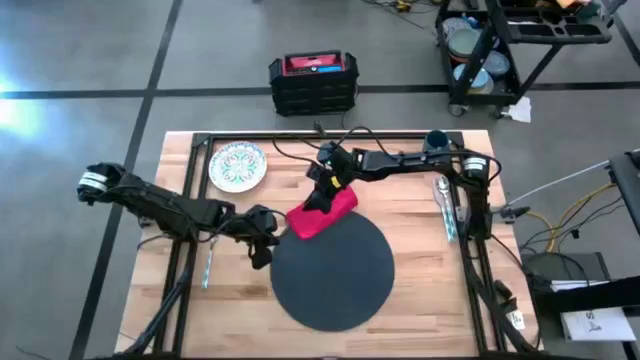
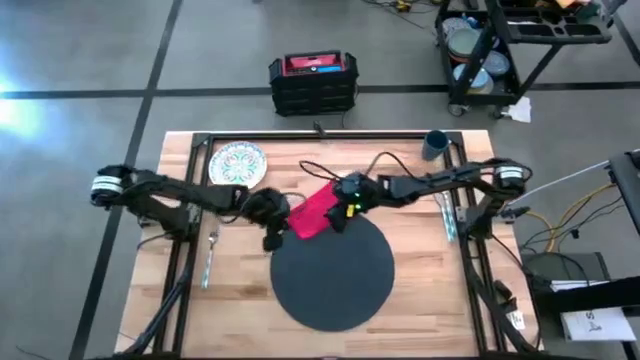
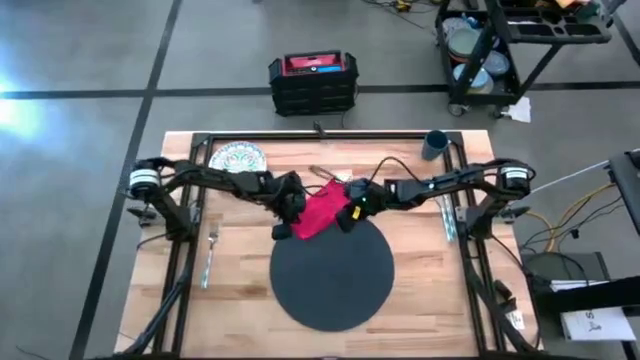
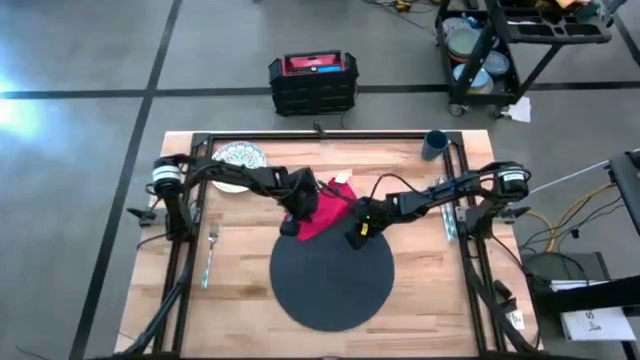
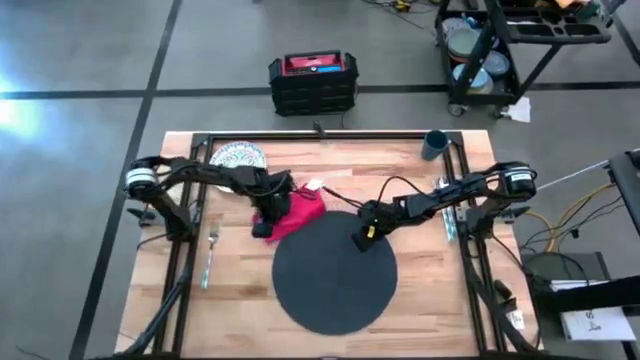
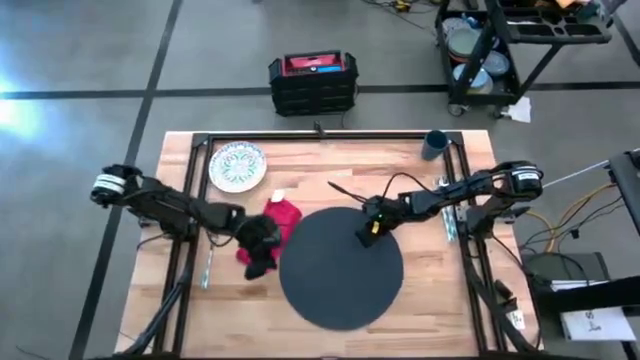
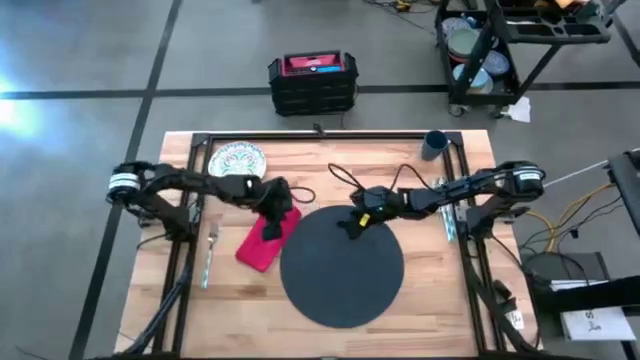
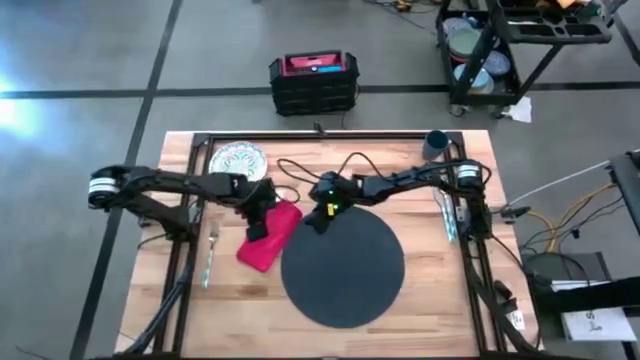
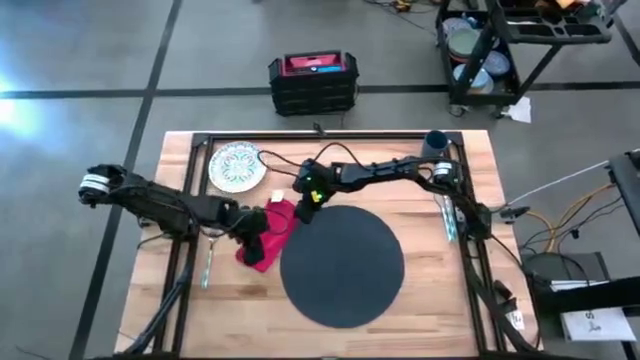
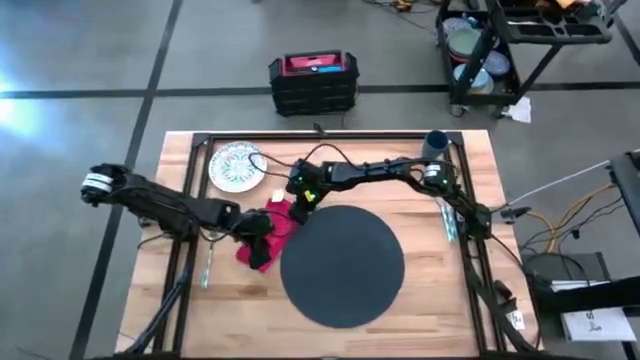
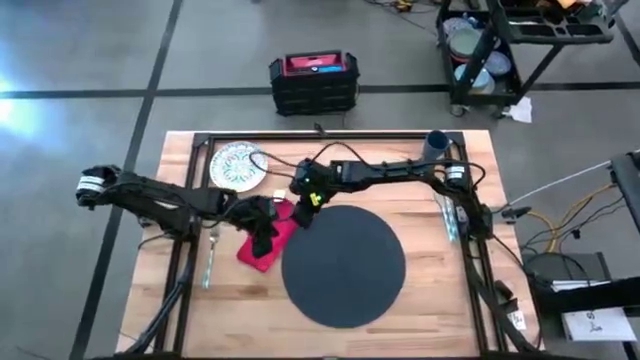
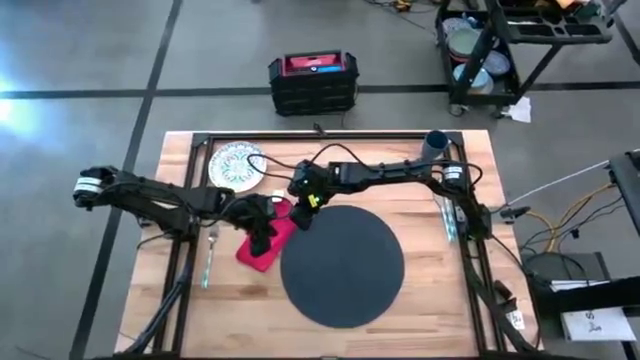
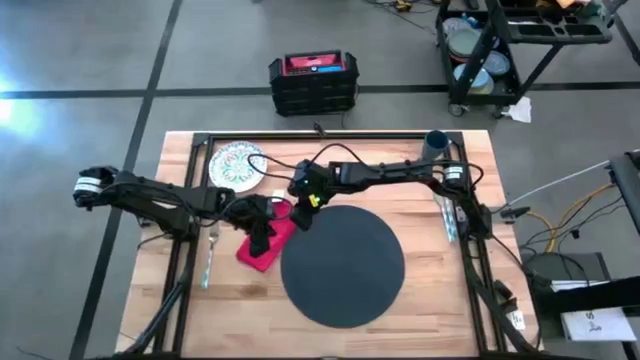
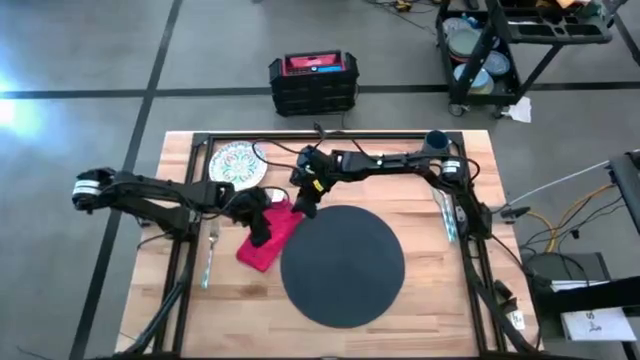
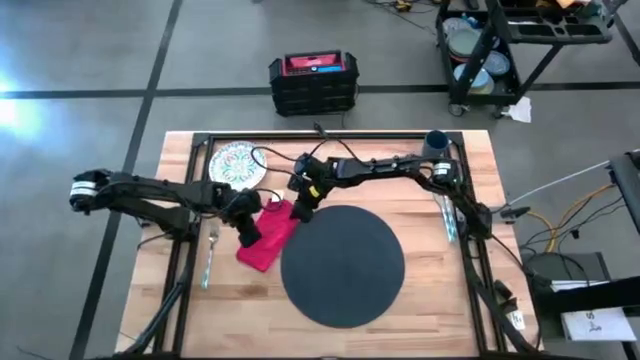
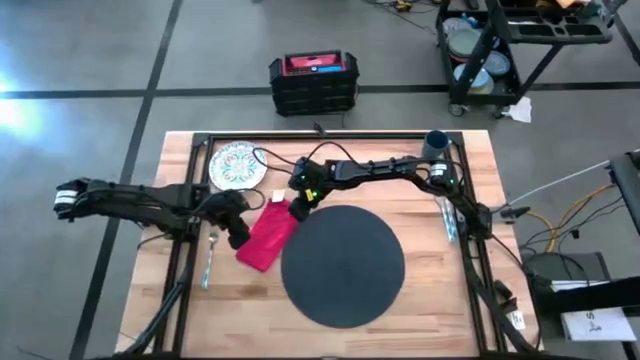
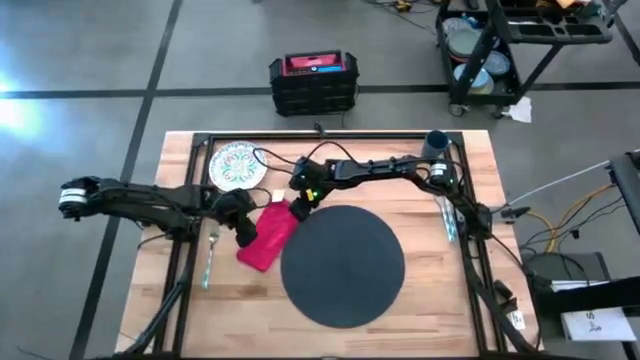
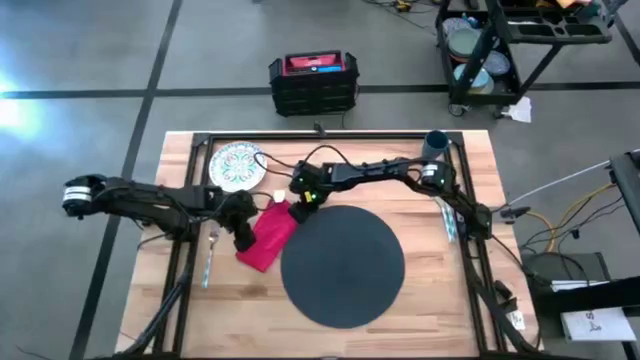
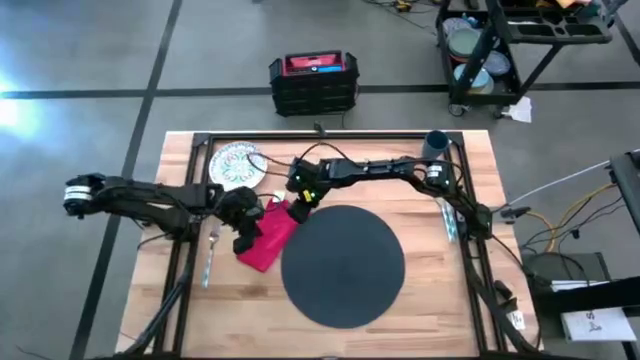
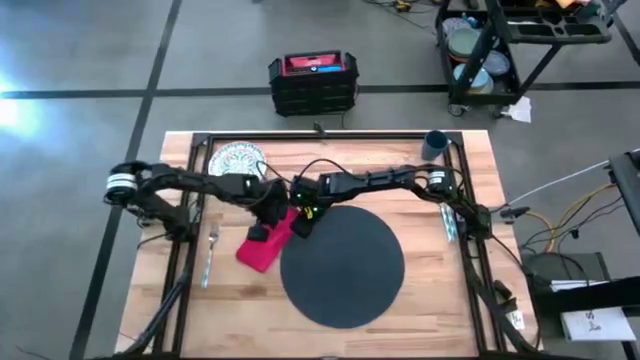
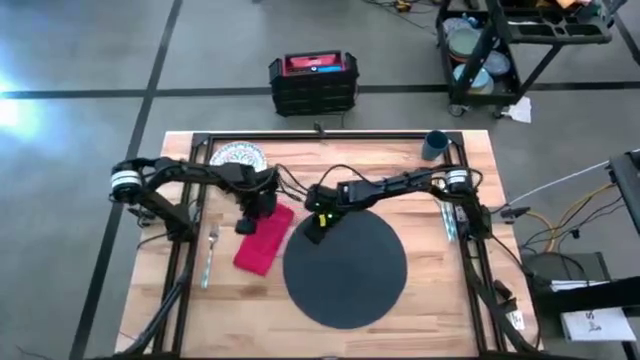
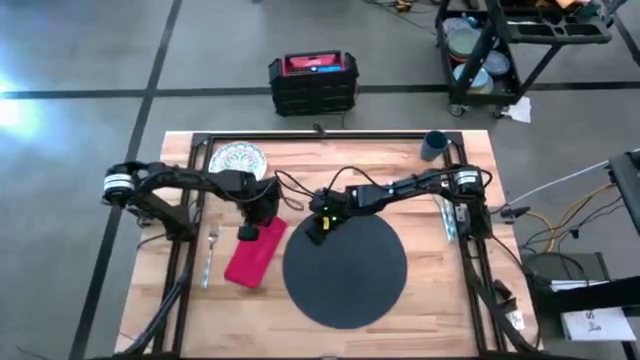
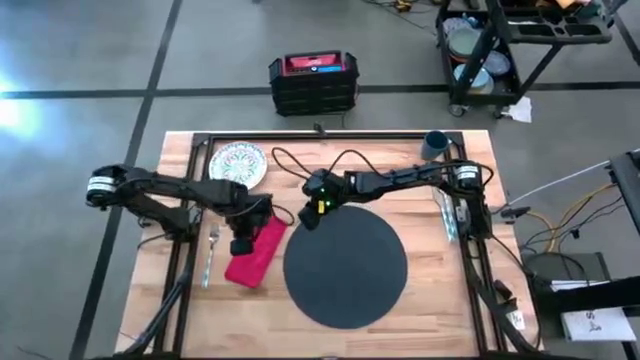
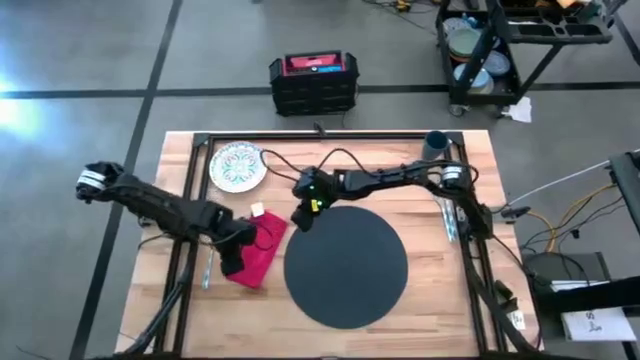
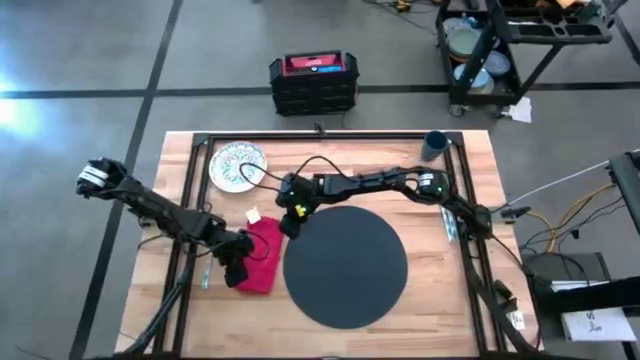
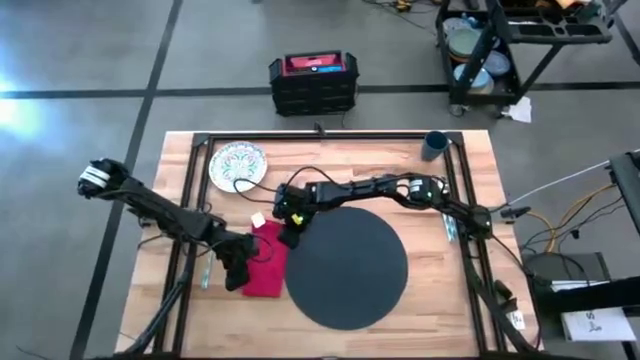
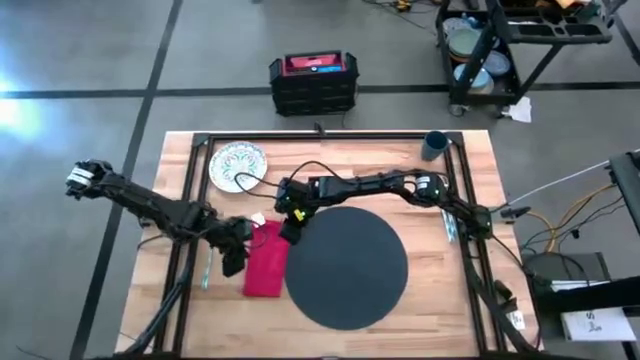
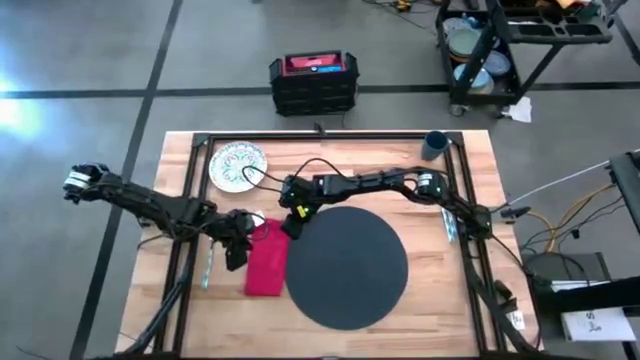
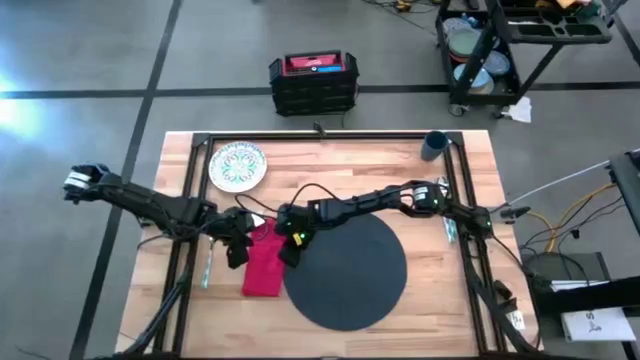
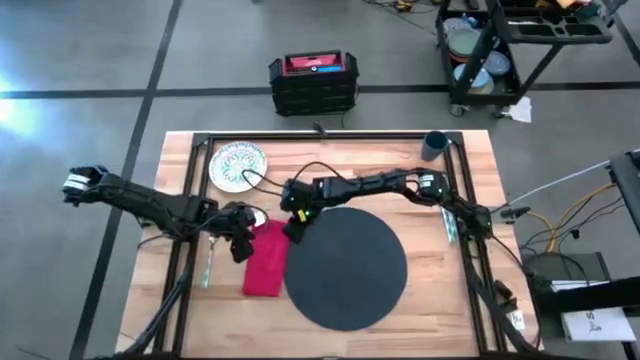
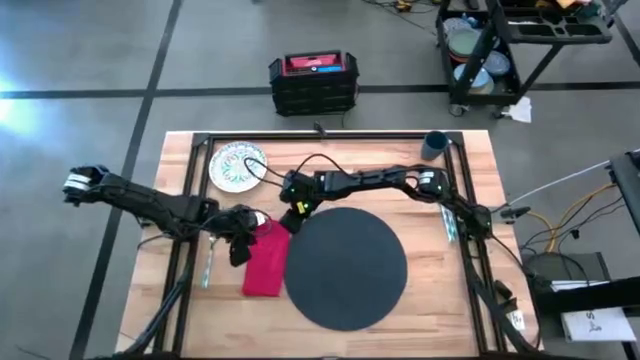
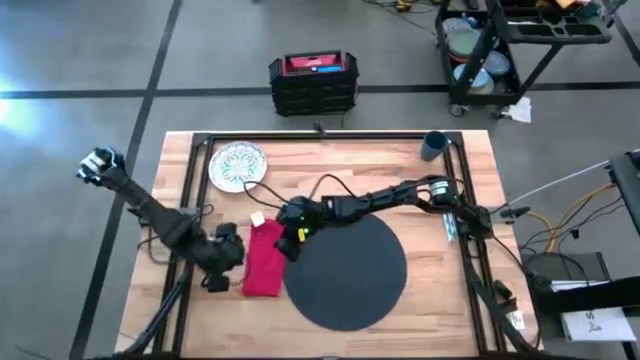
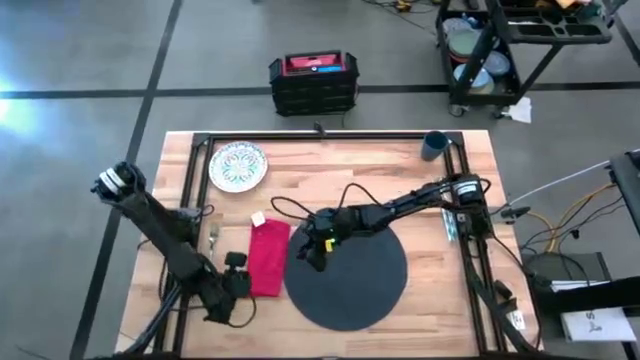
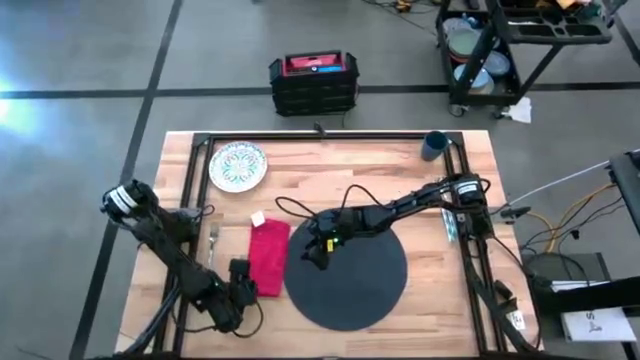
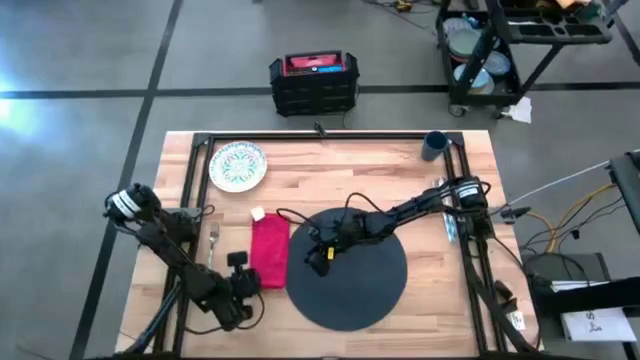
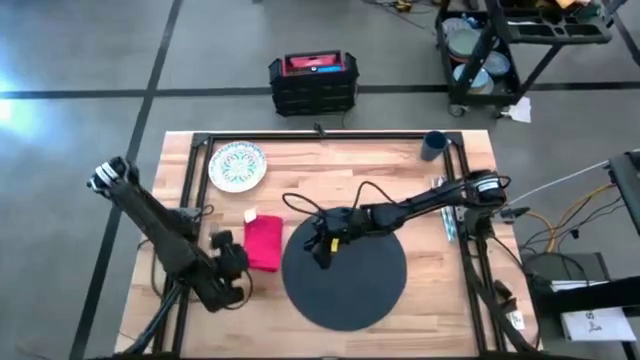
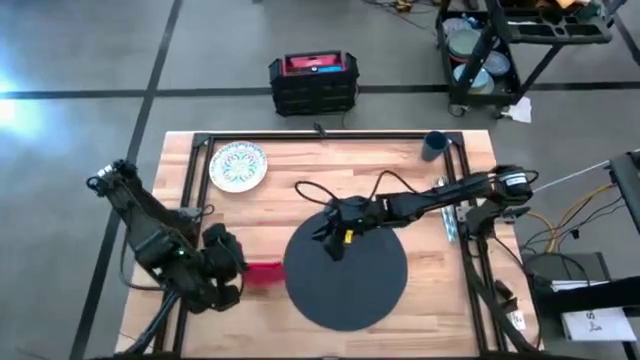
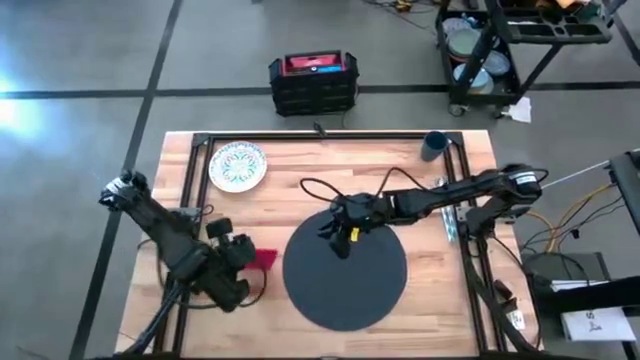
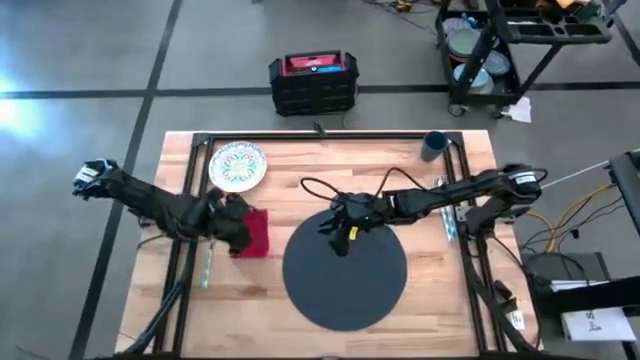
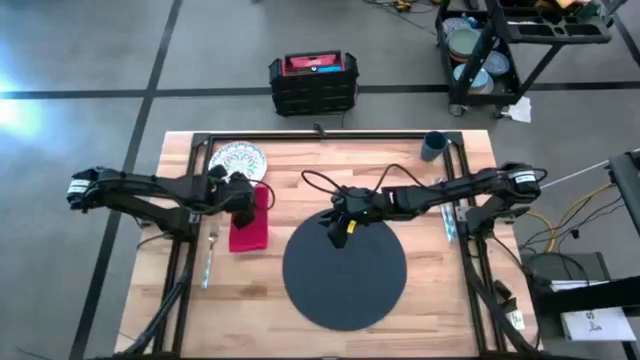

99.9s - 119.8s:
Task: Set table place
Move the red napkin to the left of the black placemat
